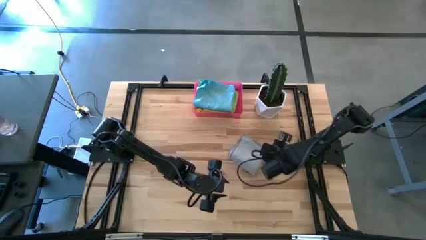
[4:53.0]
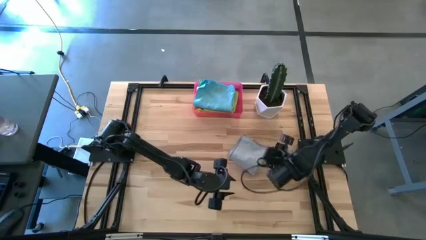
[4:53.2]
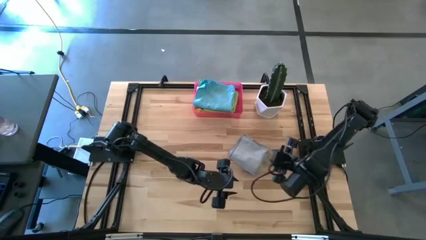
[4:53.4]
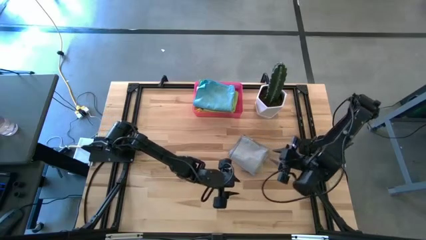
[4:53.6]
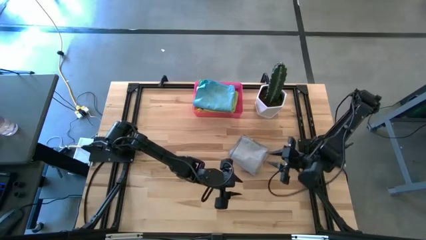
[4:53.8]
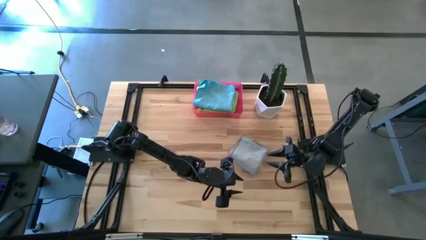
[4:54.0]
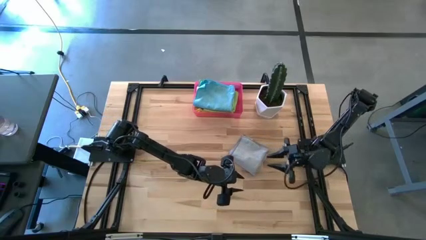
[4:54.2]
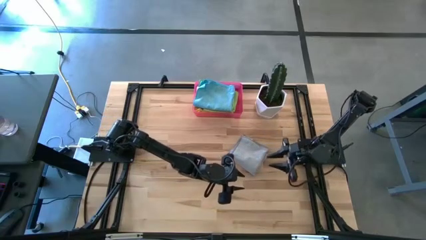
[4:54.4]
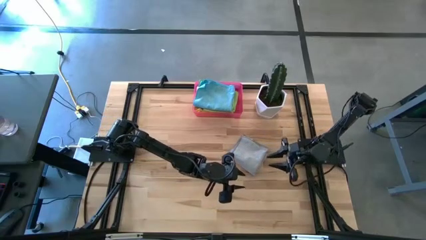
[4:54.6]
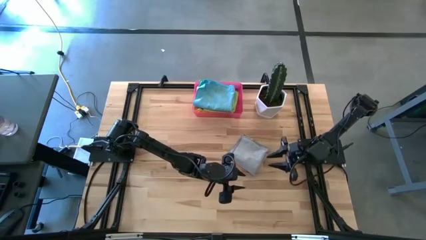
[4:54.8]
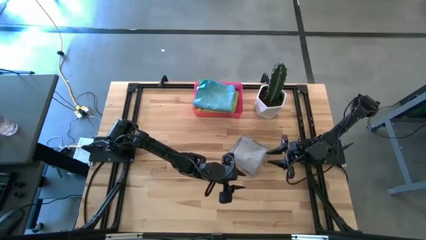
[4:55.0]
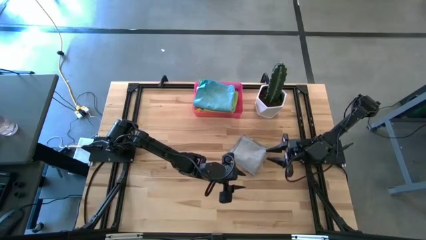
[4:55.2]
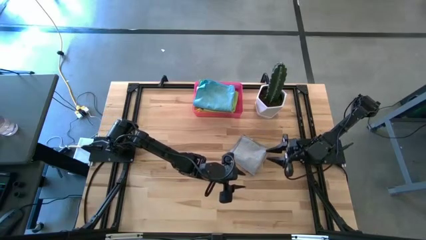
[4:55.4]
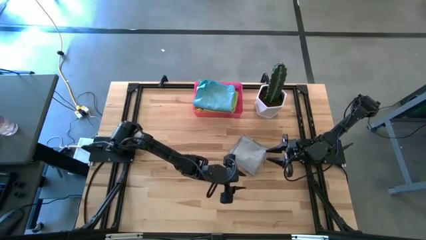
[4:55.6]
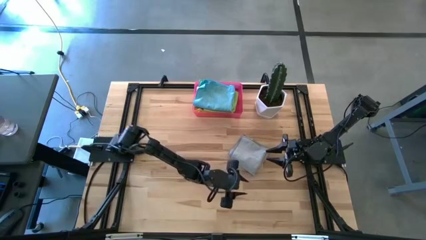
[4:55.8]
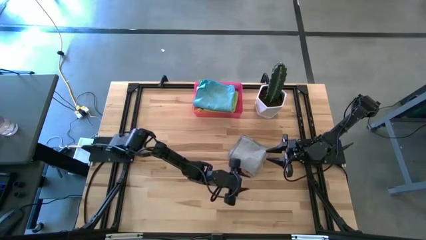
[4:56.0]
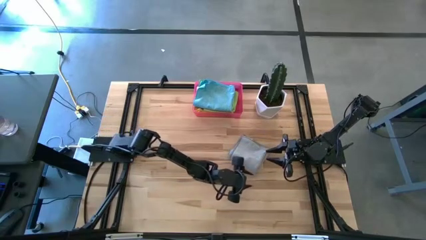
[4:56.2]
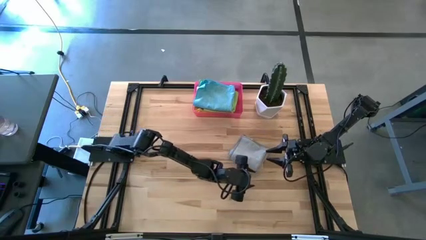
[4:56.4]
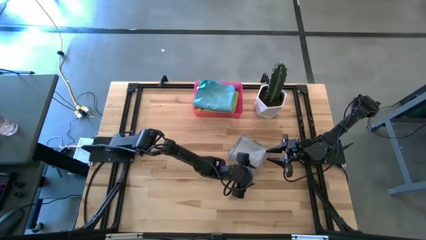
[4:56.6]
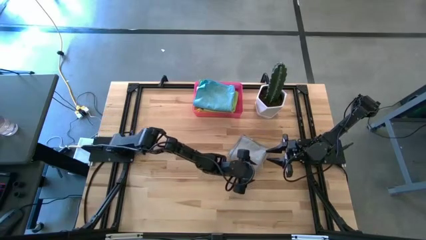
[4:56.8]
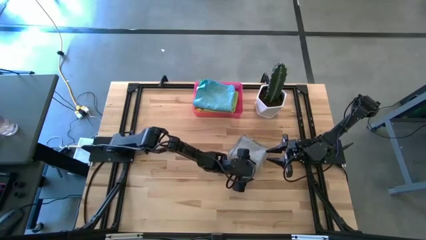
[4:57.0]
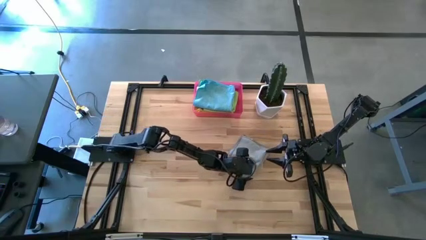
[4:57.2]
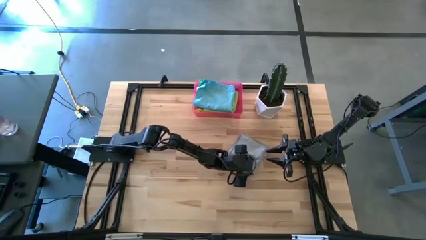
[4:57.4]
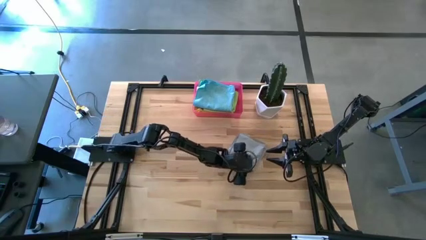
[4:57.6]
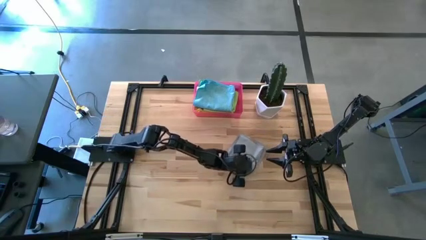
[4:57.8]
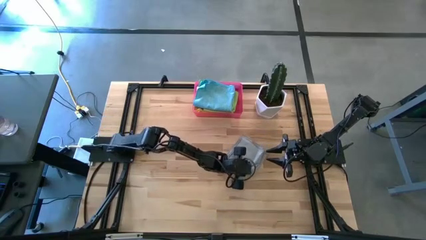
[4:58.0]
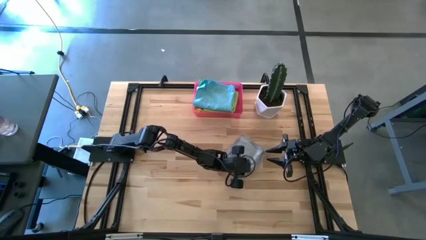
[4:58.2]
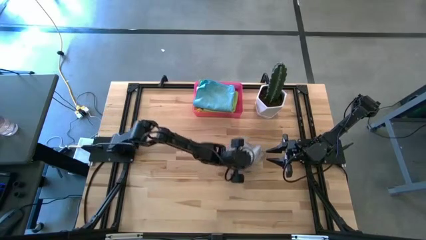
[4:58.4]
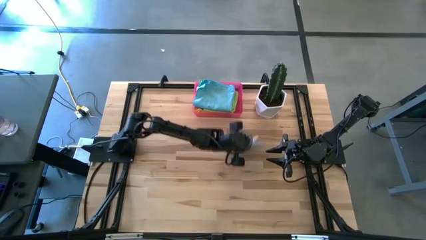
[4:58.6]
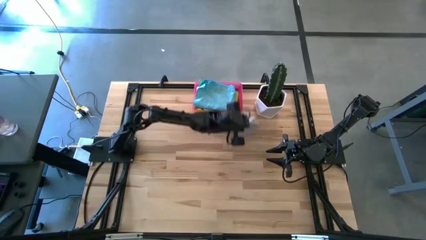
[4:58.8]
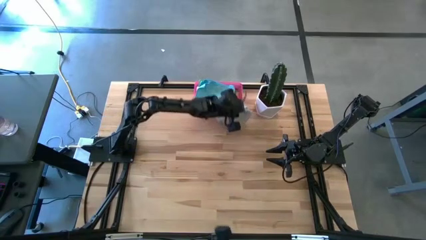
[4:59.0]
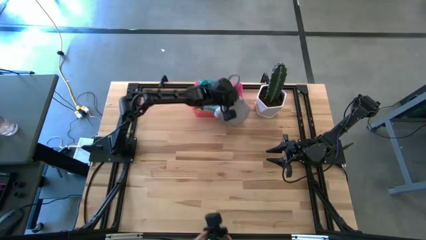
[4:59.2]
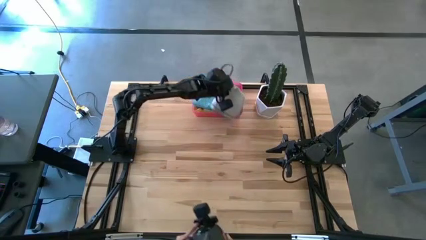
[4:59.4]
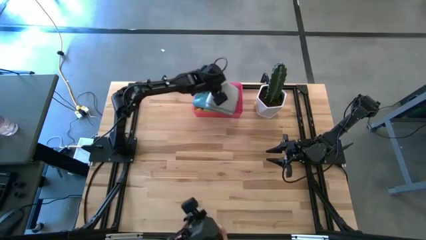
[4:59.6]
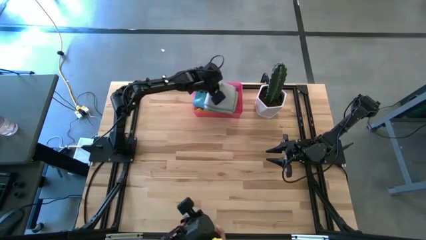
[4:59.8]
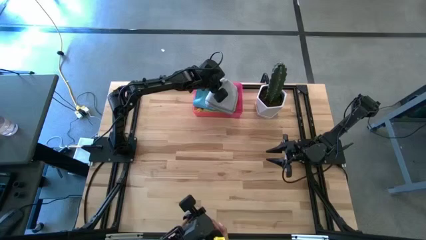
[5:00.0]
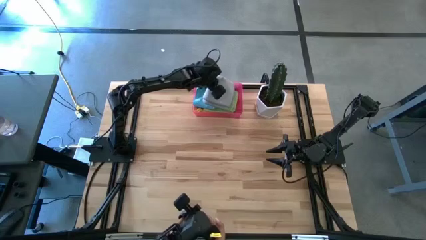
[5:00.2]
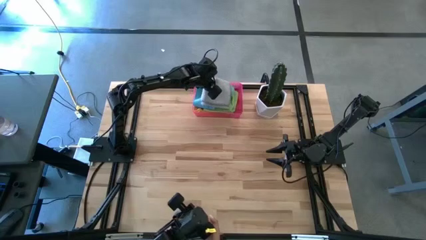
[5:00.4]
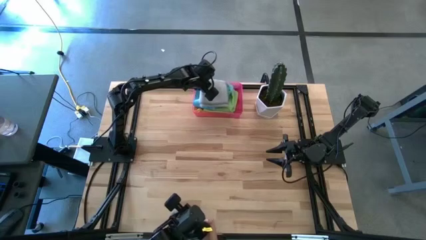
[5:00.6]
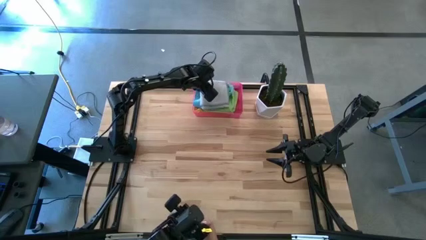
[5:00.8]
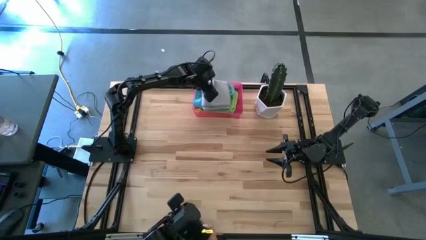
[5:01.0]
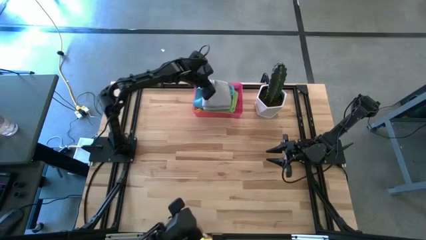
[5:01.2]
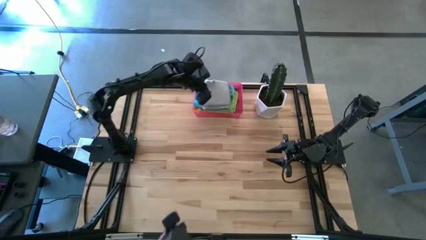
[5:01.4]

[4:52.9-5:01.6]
Task: Fold microfiber towels
Put the gray microfiber cloth into the pink bin

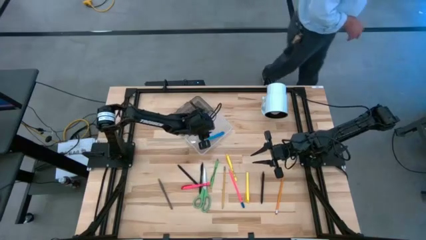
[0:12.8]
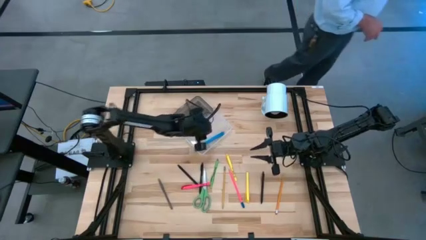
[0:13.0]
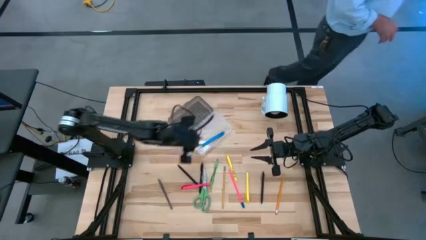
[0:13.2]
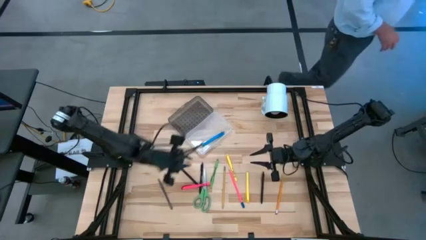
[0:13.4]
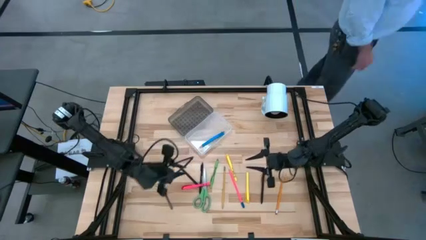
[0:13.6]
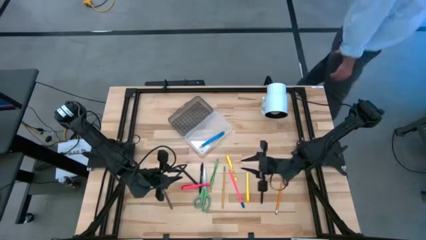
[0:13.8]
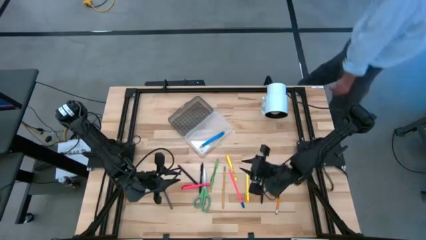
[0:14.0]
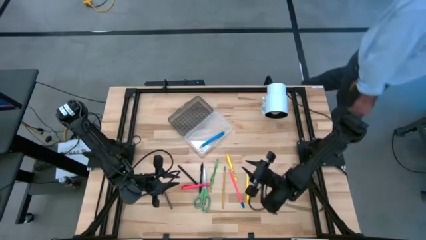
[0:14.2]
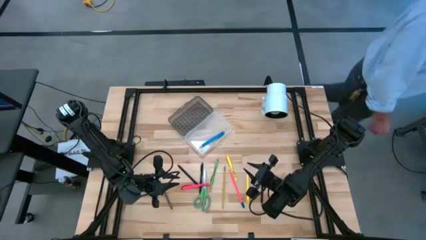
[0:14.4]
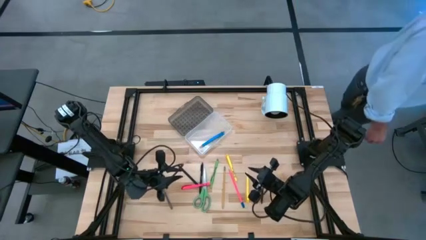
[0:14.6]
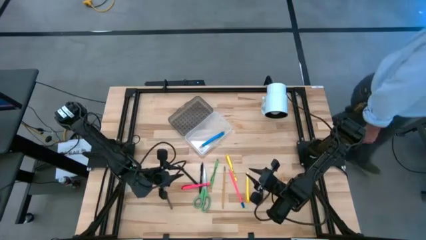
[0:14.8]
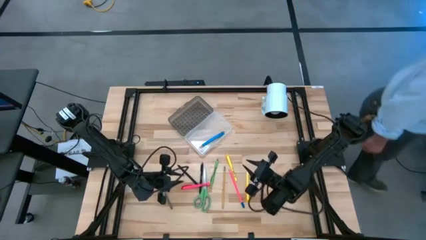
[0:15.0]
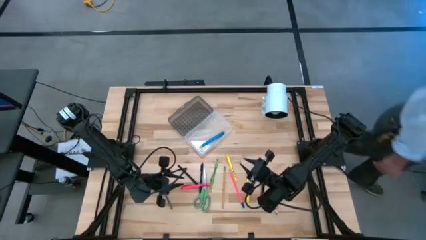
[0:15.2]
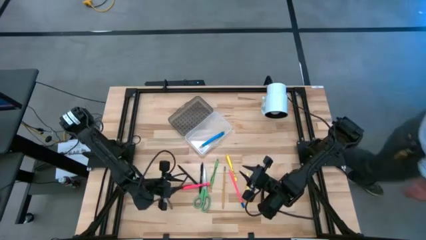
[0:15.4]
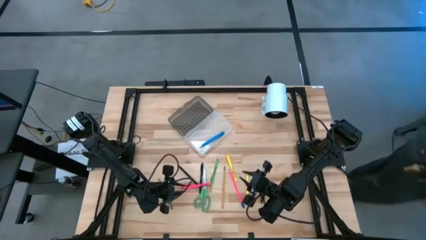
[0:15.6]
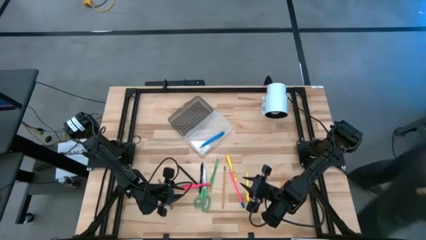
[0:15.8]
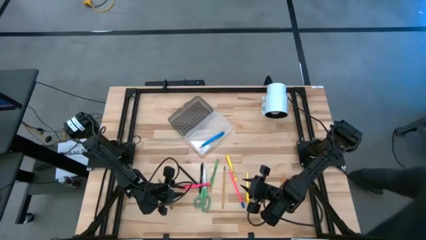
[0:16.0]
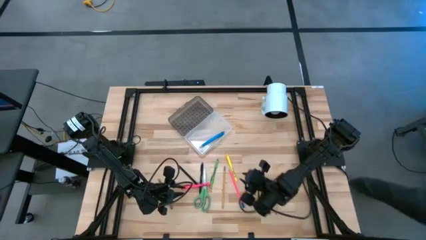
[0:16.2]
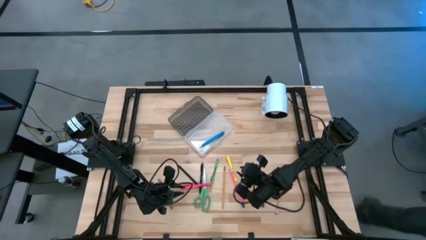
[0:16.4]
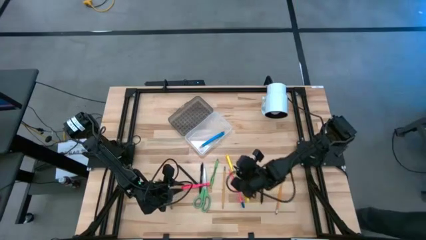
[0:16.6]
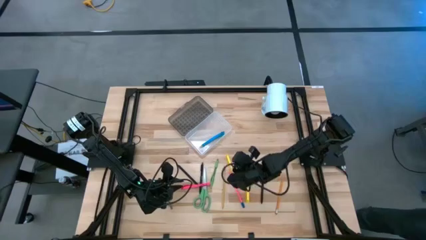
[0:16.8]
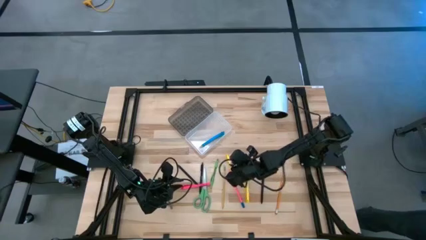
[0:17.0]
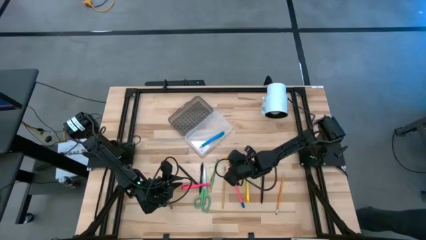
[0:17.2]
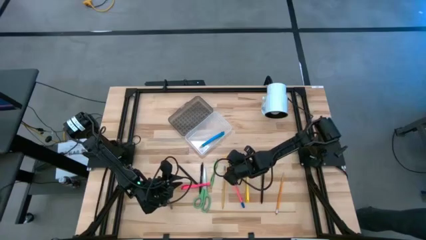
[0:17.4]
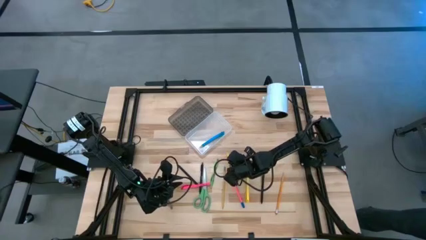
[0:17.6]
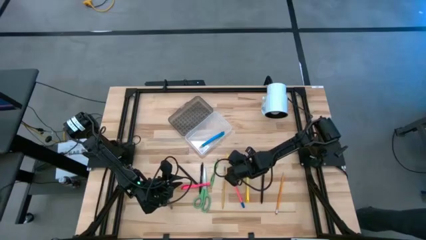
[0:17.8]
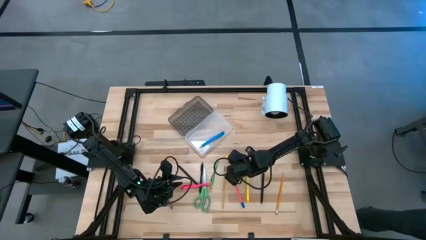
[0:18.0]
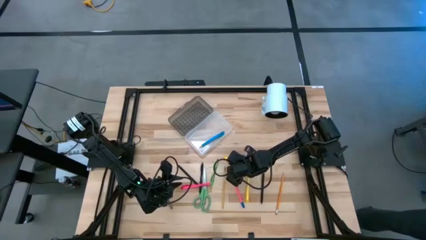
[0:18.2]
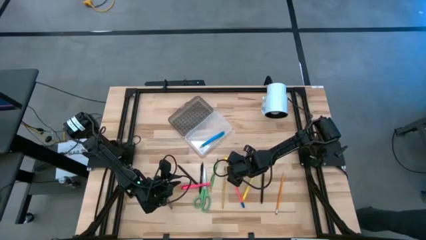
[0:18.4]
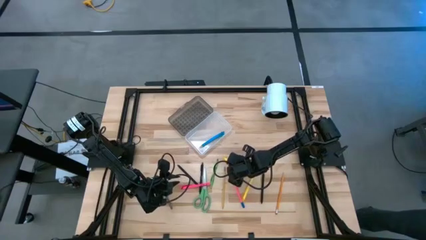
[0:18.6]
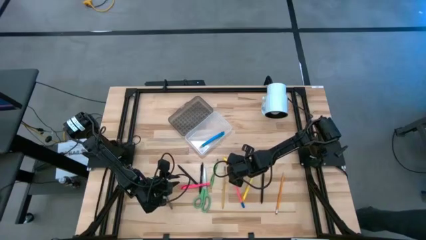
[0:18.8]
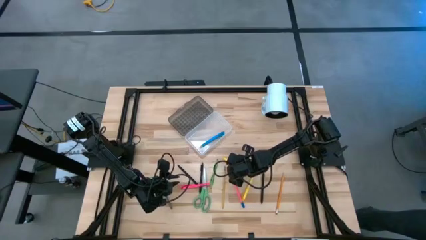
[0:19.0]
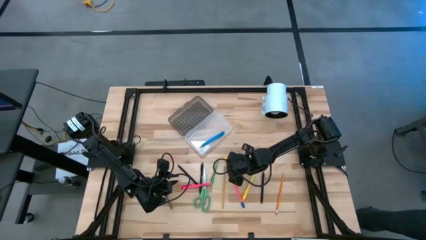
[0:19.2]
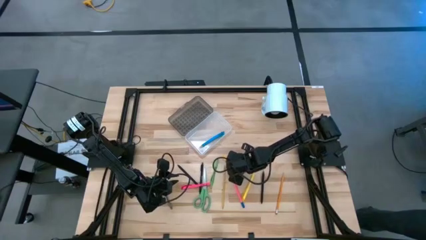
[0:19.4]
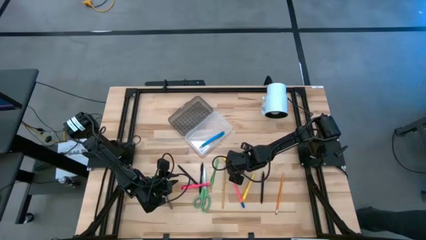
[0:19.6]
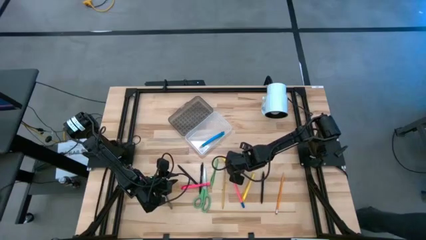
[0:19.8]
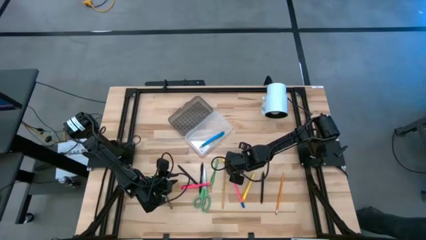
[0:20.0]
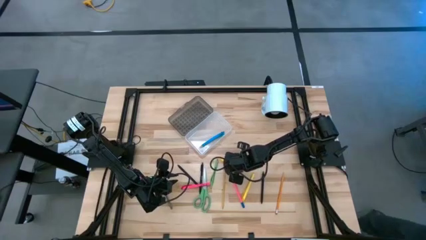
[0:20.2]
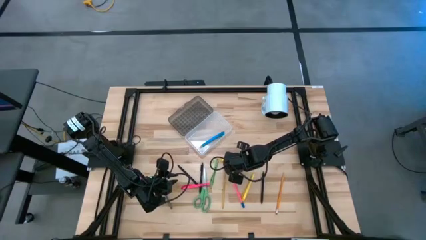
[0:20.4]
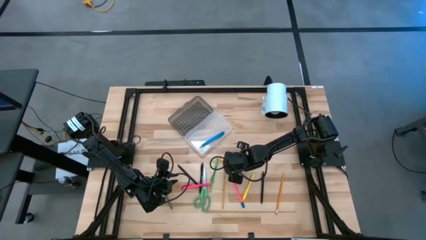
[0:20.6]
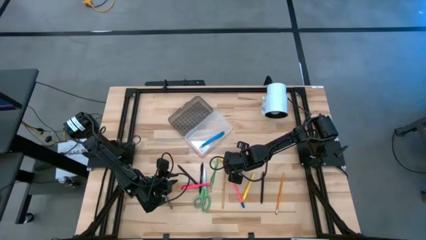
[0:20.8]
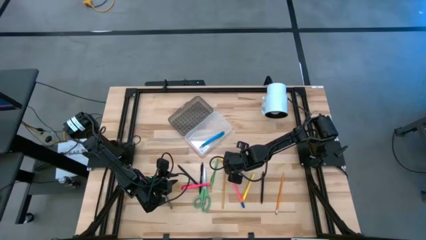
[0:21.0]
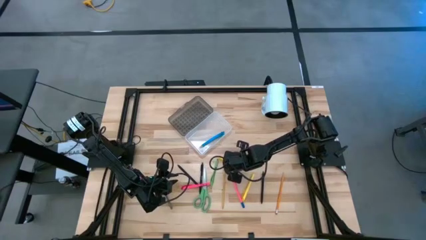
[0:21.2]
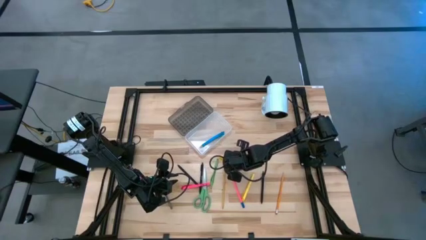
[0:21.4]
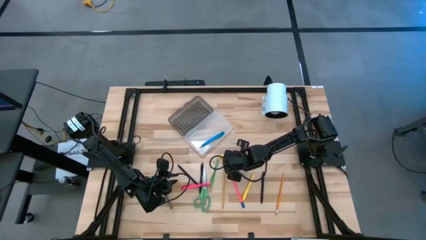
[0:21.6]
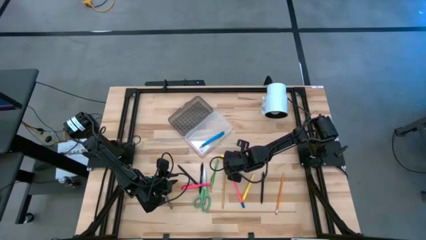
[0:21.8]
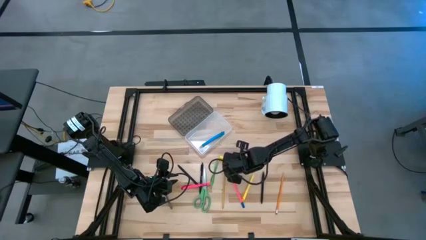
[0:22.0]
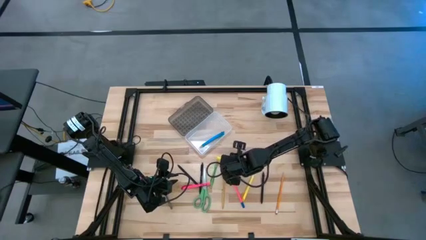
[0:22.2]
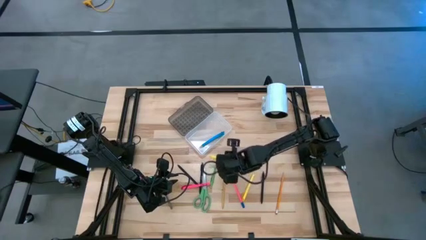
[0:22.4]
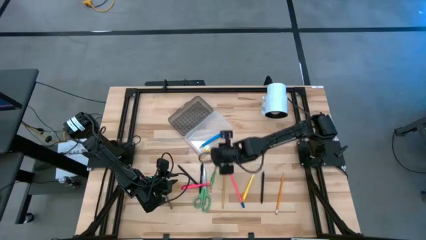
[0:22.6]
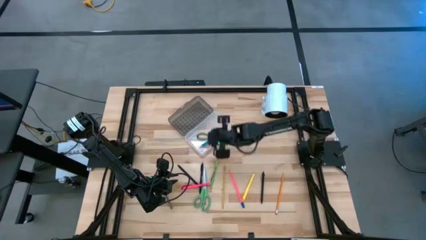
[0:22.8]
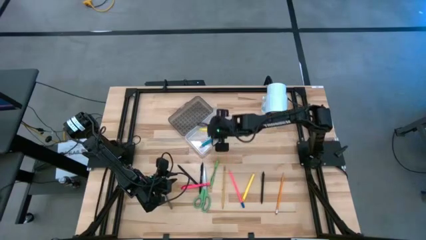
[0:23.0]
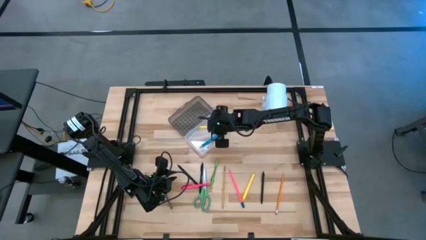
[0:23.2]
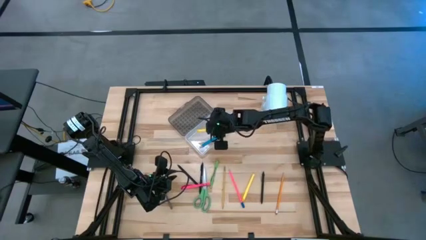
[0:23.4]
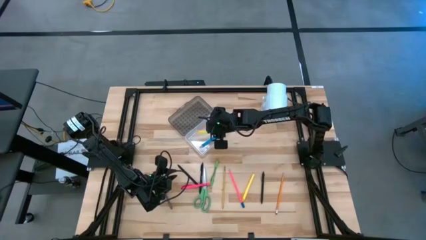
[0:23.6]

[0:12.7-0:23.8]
Task: Pick & place school supplies into a supply box
Put the left yellow pen into the transparent supply box
